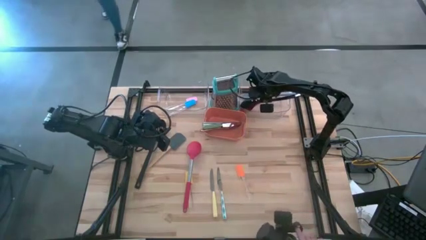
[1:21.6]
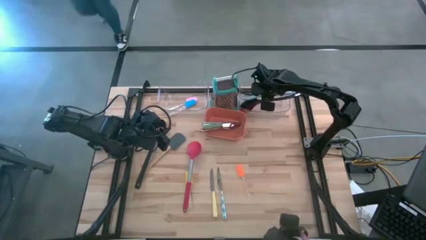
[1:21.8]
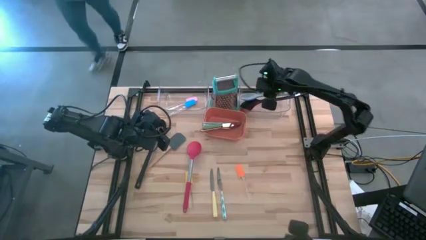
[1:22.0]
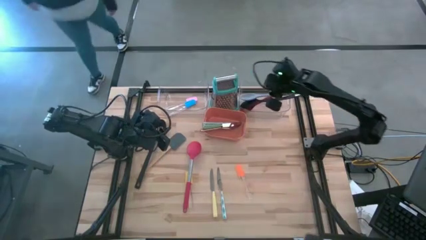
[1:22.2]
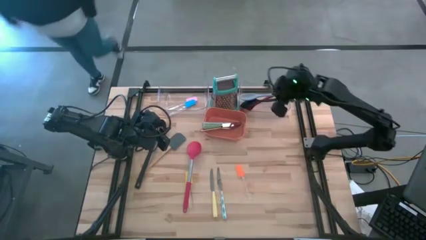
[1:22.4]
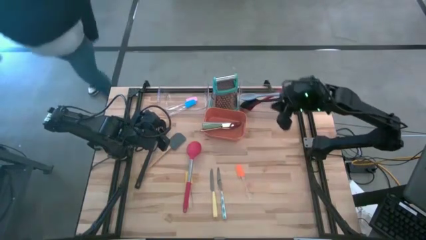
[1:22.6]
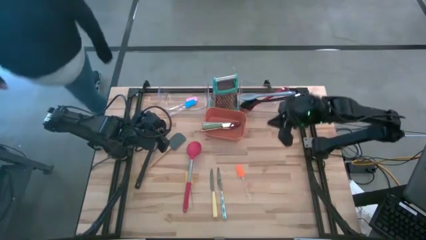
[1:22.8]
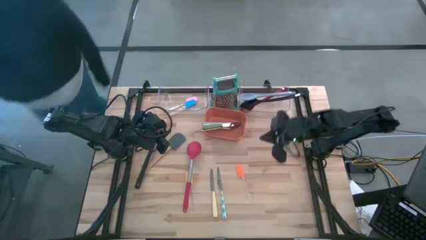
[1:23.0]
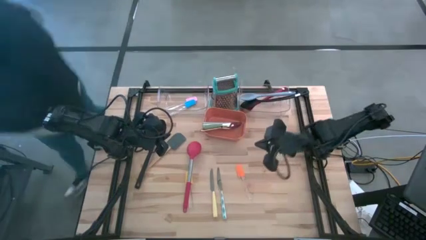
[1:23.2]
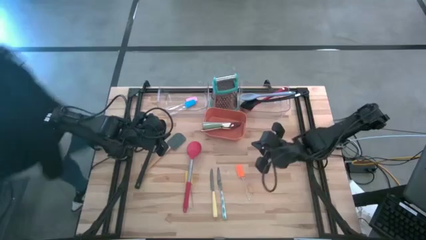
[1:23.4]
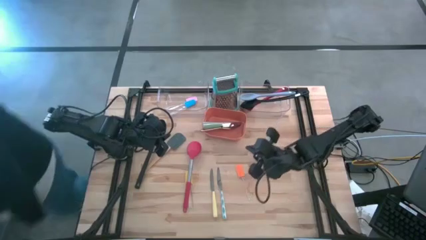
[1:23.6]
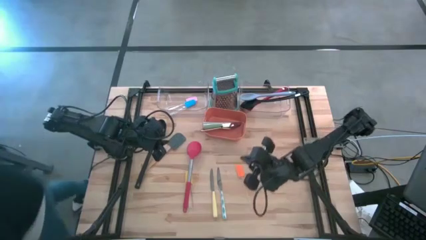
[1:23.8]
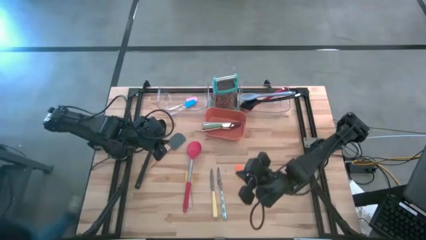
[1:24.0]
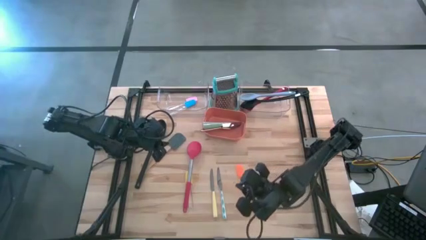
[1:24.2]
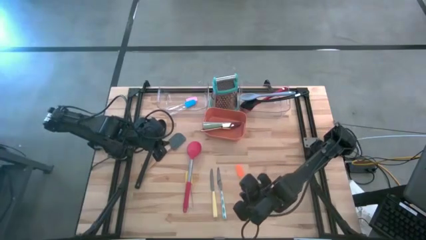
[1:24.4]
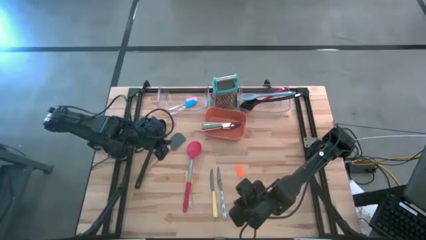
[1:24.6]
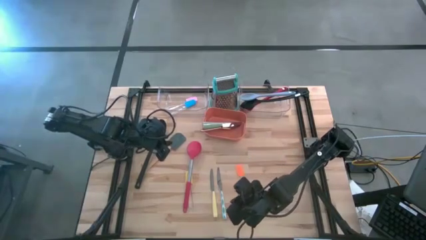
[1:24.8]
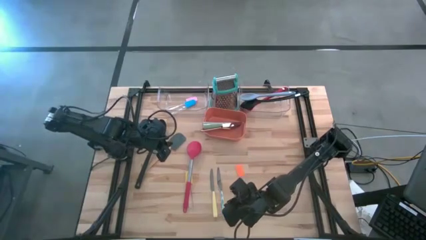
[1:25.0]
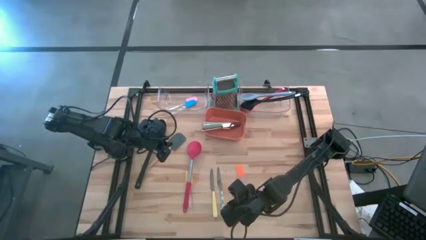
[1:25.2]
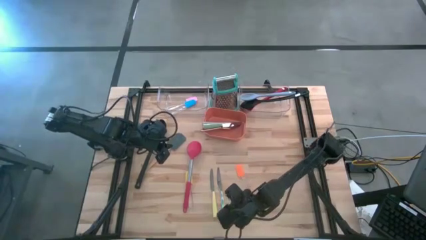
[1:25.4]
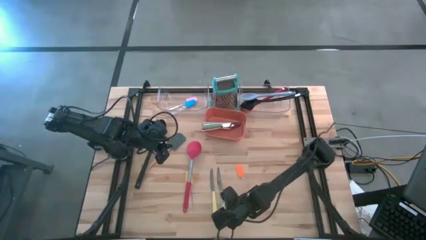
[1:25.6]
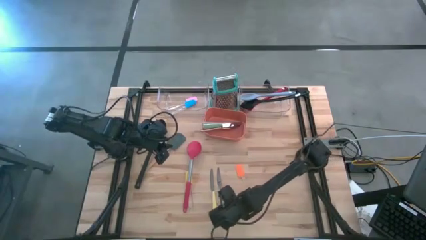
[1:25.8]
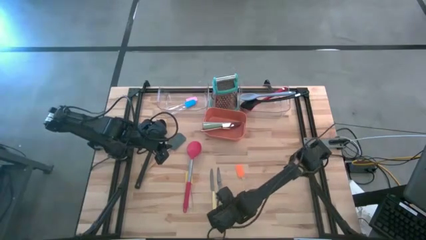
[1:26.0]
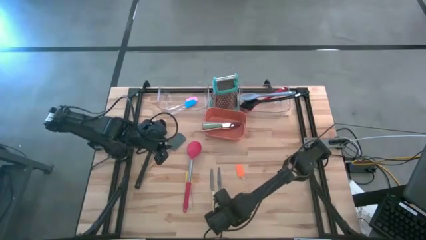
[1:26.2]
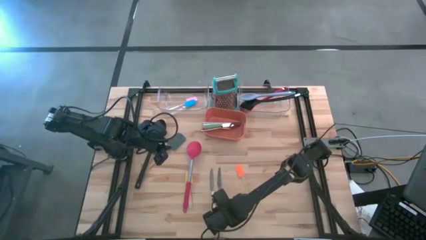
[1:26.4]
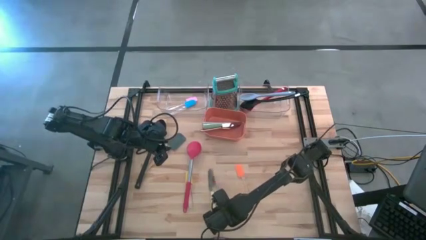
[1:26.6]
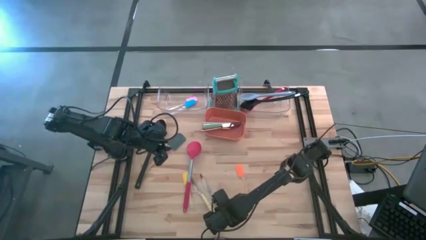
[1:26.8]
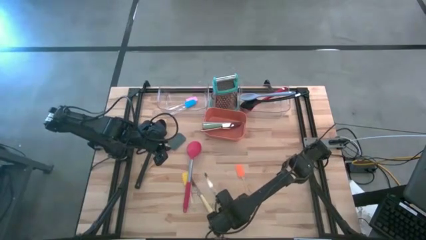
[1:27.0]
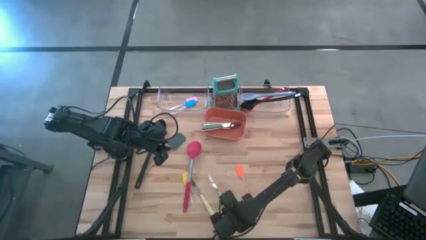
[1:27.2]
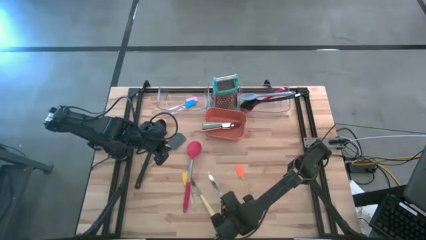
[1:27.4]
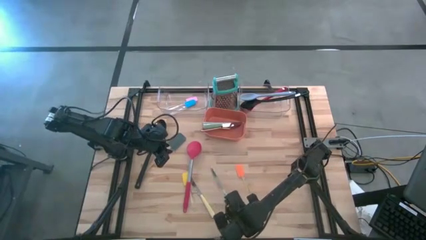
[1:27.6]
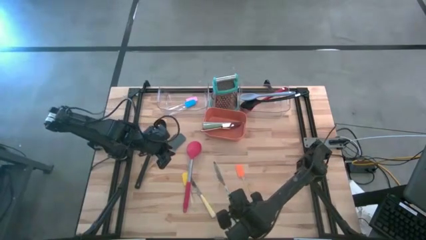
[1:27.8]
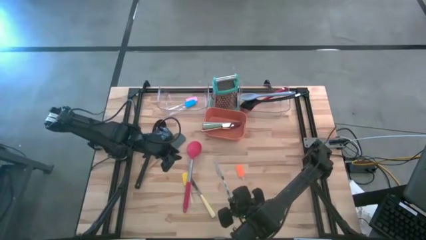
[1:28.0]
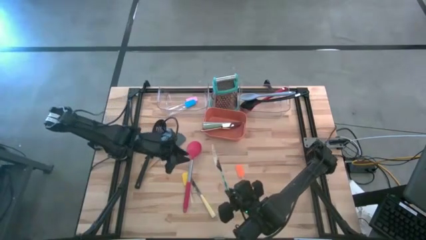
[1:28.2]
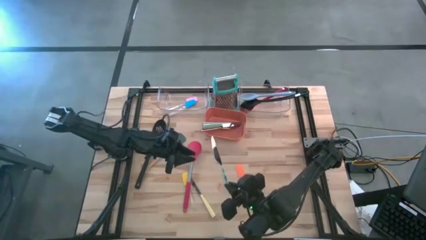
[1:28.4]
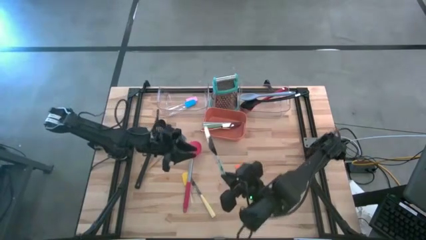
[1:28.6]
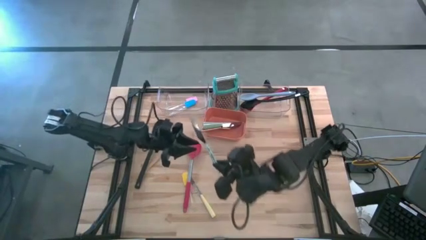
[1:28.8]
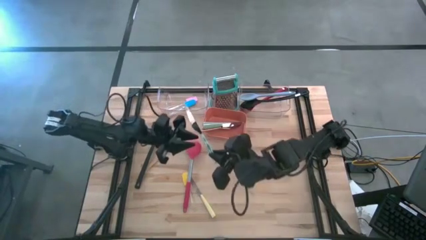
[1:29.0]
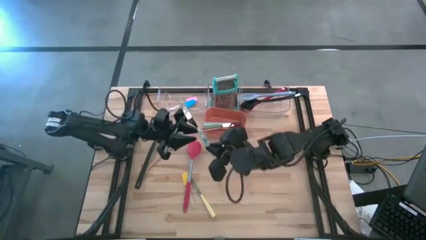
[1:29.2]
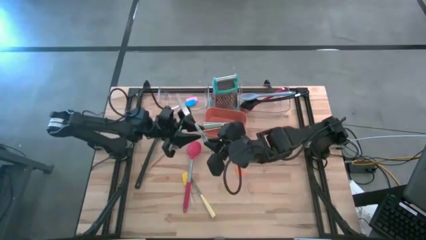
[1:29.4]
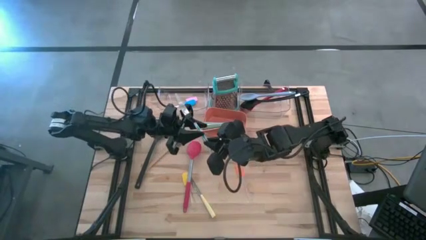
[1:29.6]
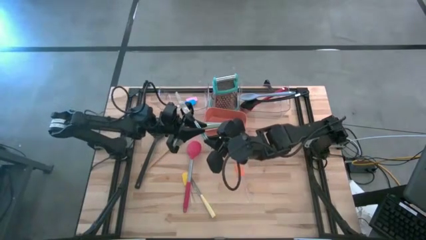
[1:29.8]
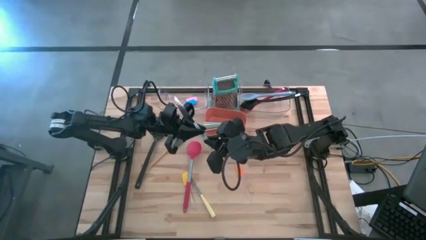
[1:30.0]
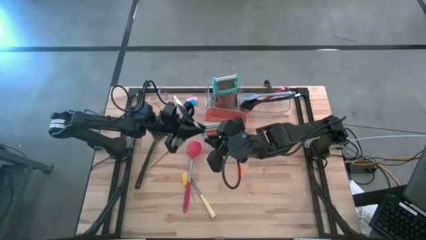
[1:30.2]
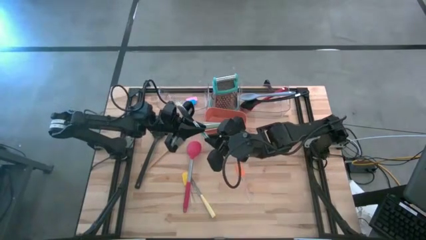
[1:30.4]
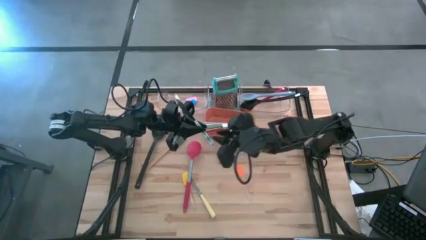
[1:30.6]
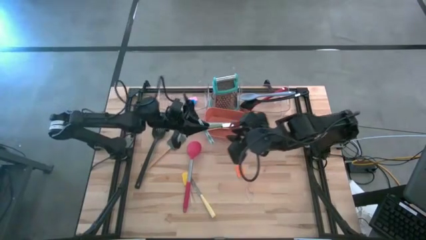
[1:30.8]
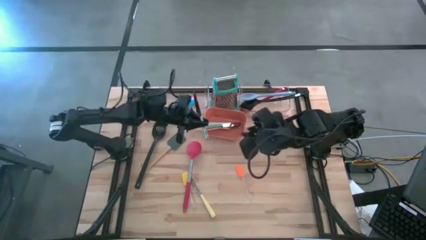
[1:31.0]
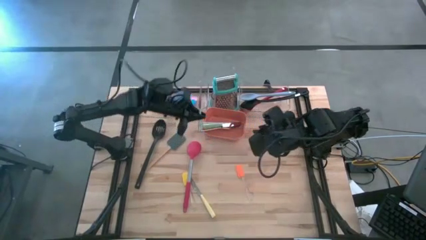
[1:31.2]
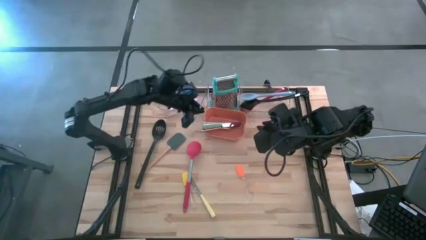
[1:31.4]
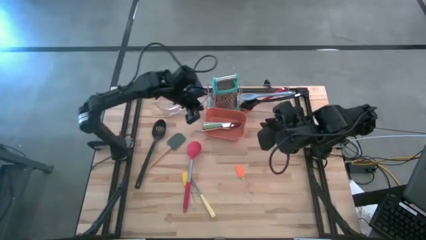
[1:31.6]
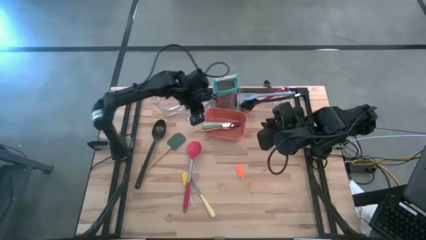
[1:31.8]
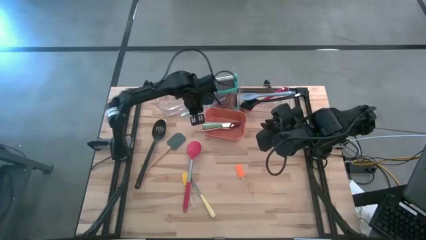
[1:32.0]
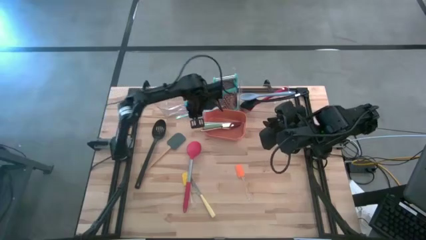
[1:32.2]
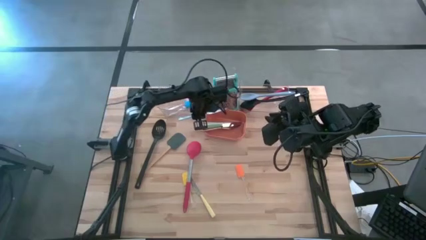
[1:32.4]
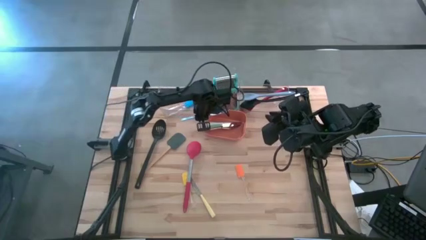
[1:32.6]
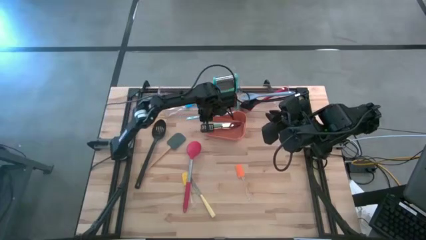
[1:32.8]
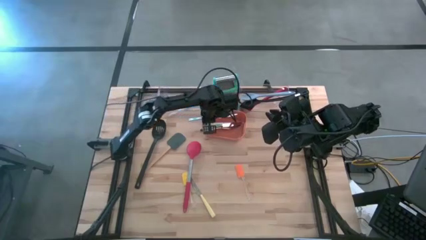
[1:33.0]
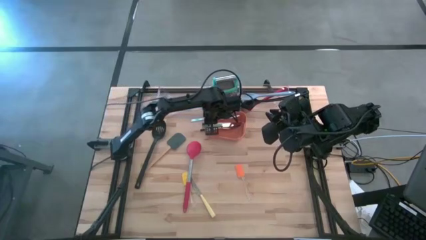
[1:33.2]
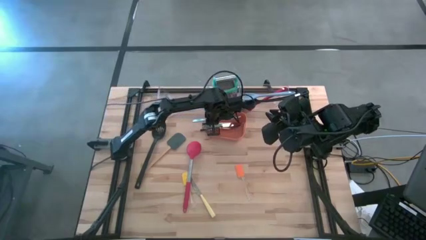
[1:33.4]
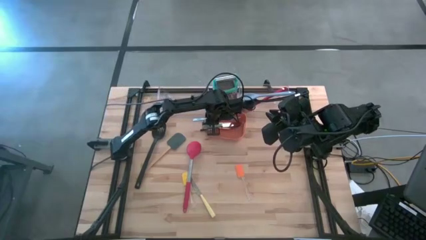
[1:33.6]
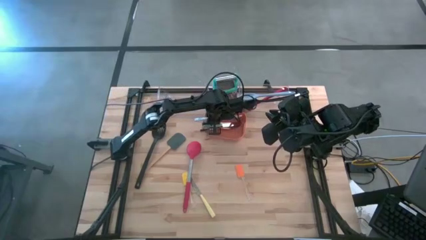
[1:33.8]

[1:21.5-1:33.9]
Task: Pick & Place Kitchen Items
Put the white table knife into the orange bin

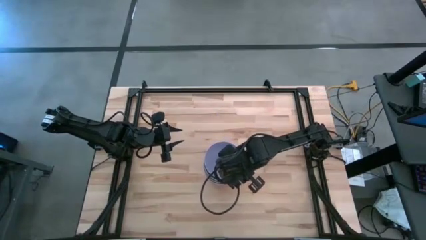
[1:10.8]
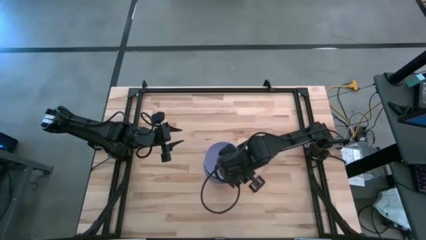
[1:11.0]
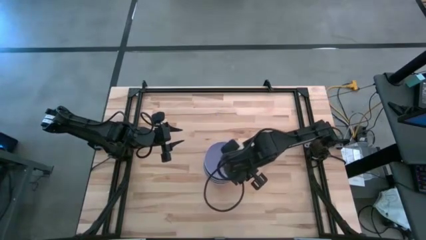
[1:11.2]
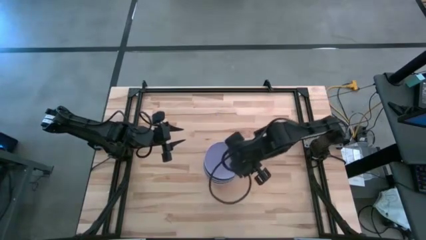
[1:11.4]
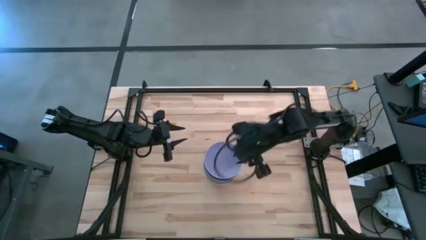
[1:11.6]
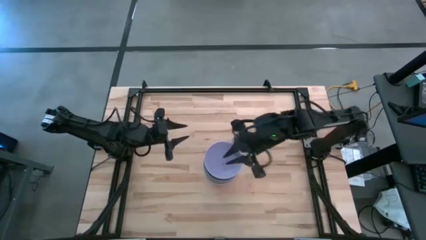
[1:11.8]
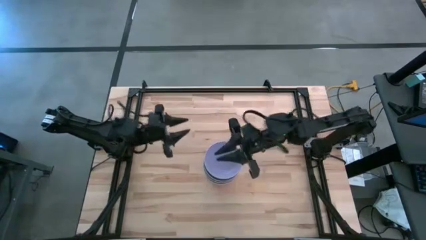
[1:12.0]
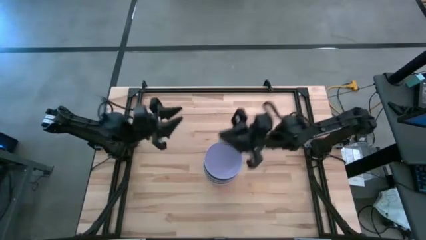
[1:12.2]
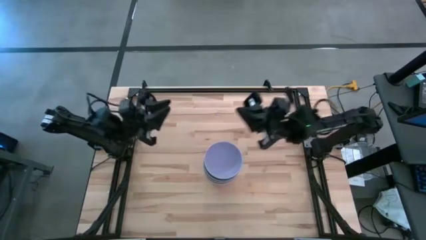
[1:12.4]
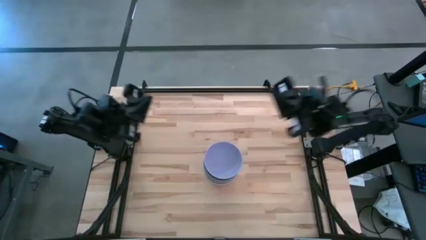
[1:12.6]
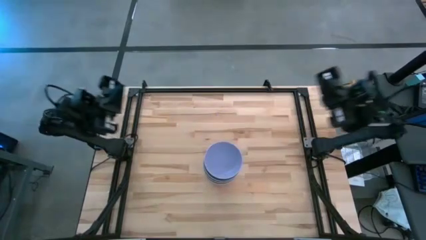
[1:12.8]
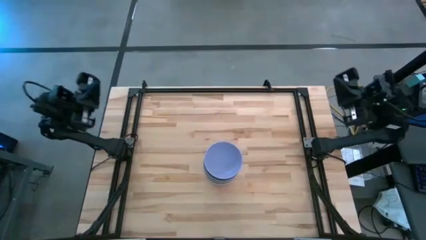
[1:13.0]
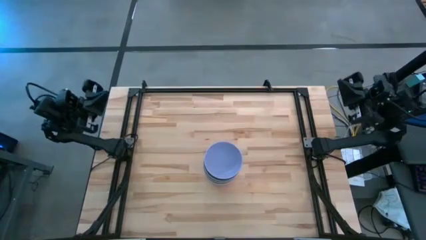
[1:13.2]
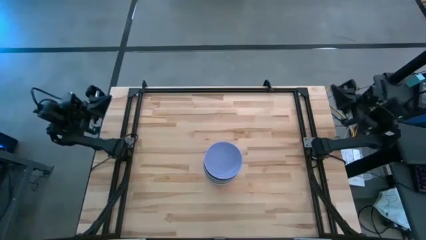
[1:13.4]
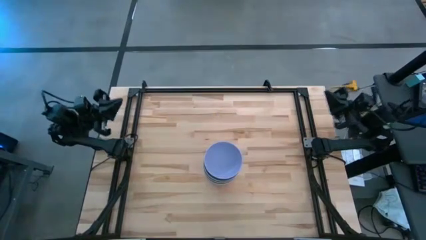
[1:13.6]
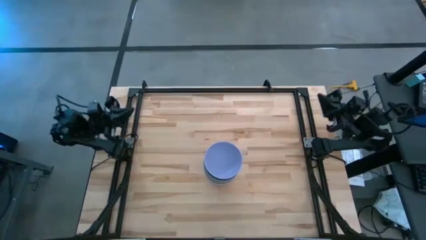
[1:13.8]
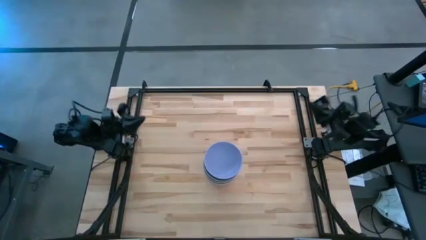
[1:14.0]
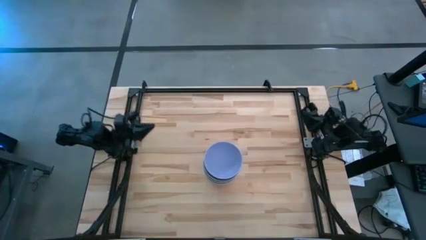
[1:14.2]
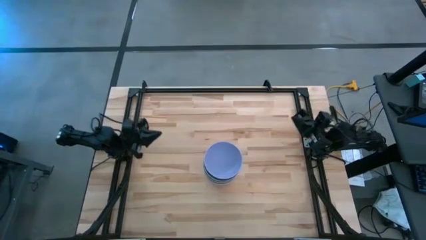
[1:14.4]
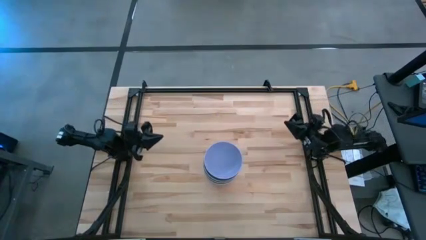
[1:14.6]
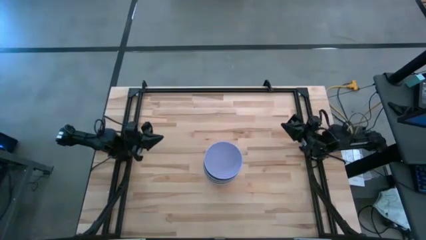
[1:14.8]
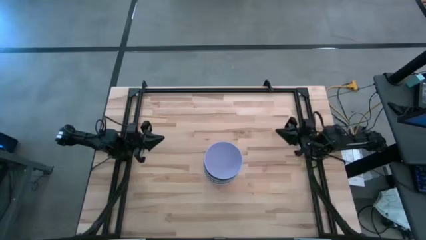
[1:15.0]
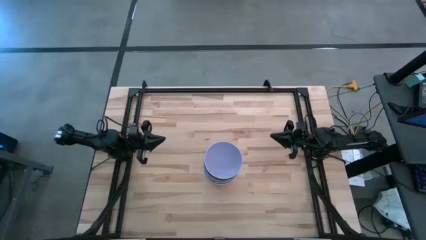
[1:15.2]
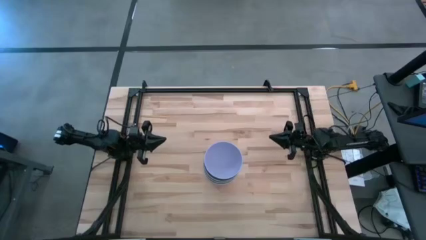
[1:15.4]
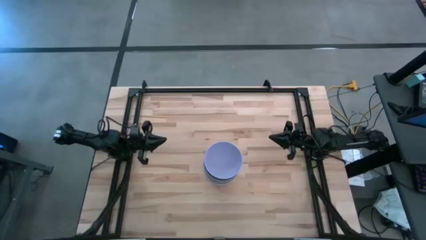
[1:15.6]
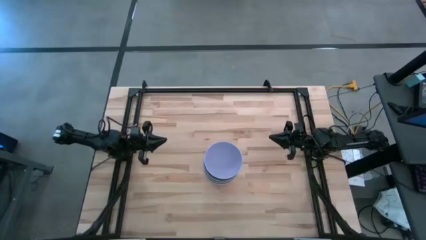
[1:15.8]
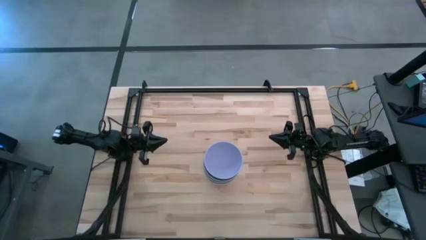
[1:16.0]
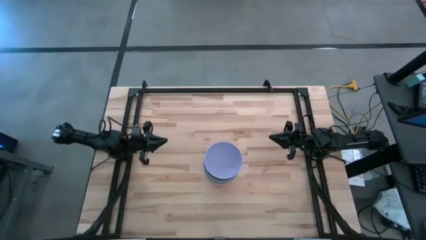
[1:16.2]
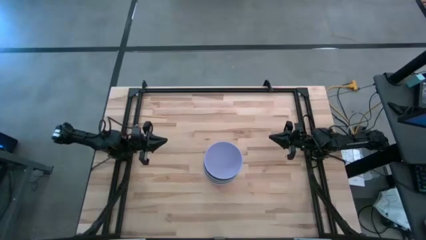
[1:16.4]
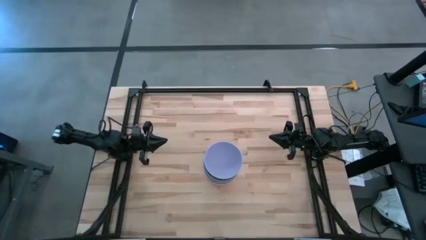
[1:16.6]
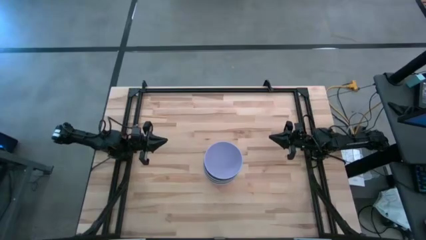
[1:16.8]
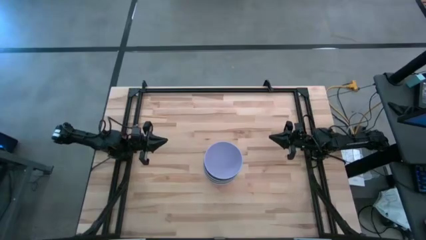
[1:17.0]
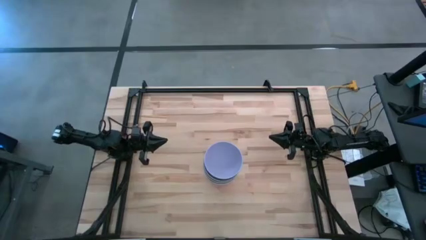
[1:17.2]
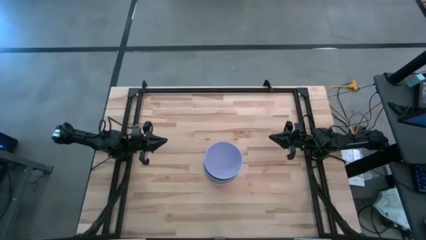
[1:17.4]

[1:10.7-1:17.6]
Task: Nest bowls inside each other
Return to Home Position
